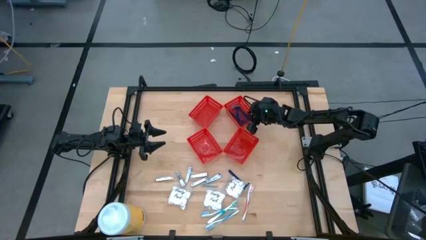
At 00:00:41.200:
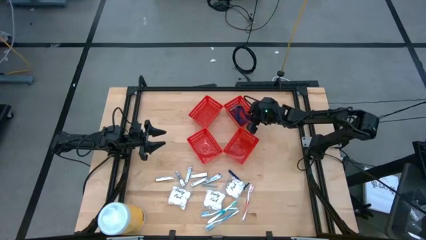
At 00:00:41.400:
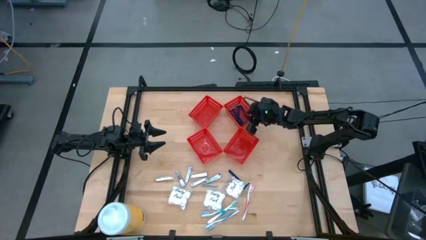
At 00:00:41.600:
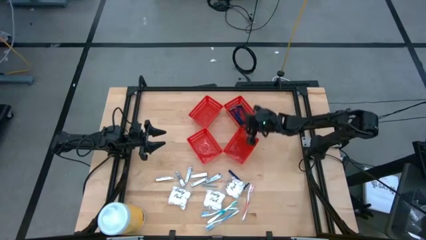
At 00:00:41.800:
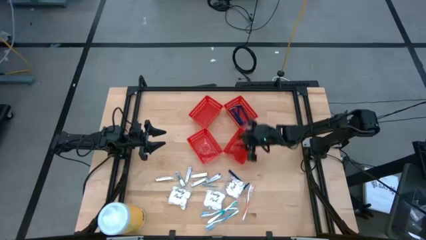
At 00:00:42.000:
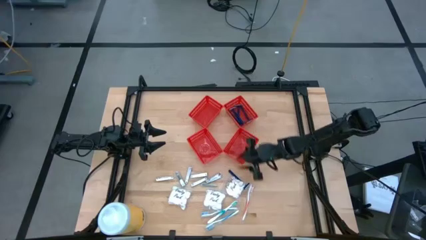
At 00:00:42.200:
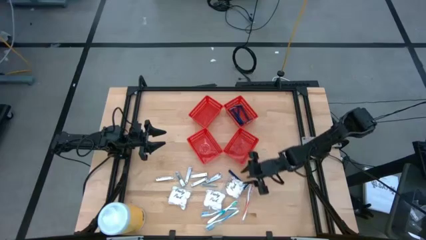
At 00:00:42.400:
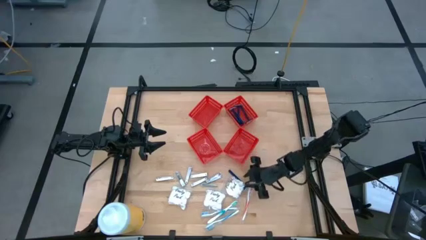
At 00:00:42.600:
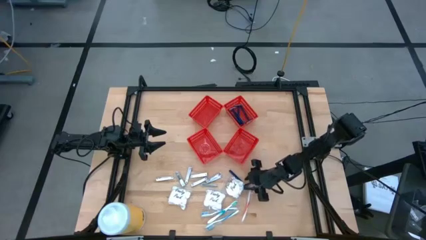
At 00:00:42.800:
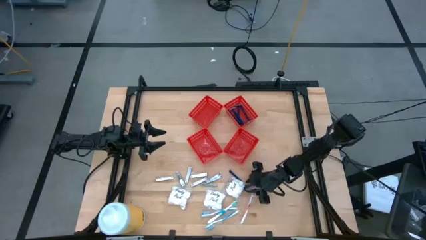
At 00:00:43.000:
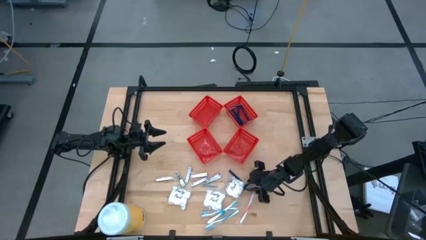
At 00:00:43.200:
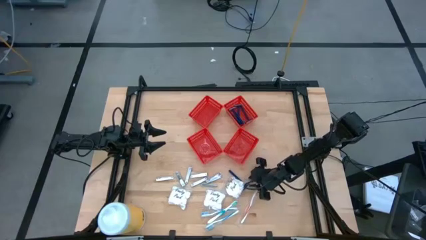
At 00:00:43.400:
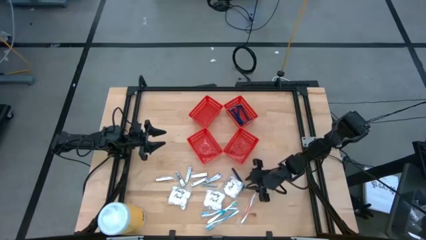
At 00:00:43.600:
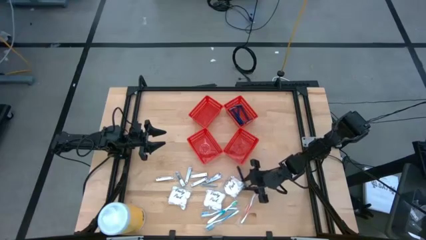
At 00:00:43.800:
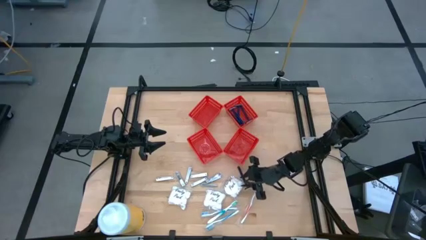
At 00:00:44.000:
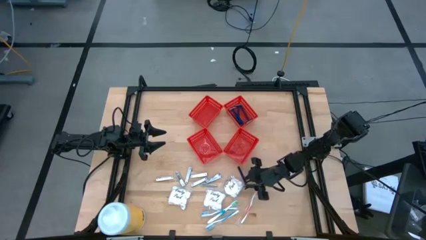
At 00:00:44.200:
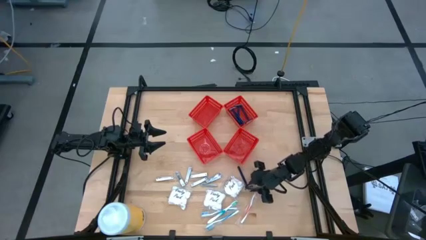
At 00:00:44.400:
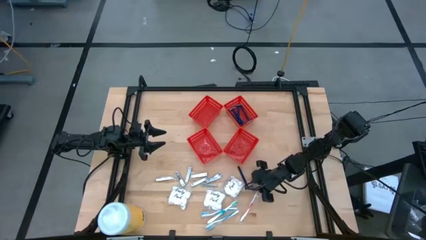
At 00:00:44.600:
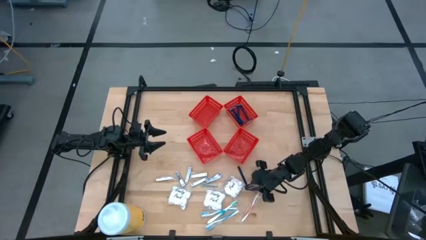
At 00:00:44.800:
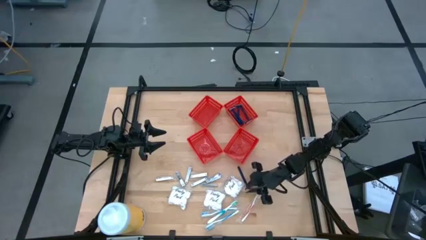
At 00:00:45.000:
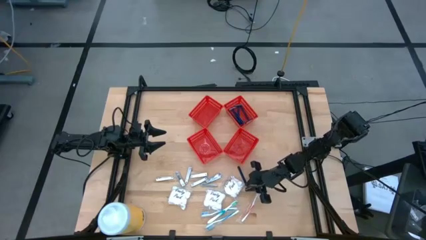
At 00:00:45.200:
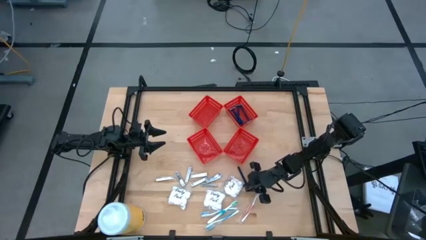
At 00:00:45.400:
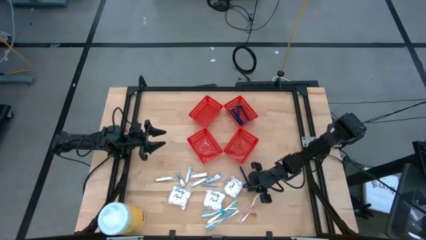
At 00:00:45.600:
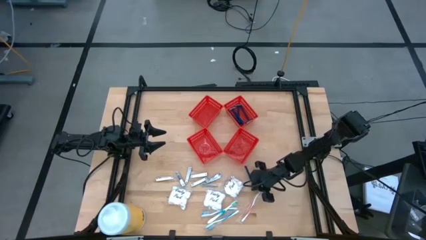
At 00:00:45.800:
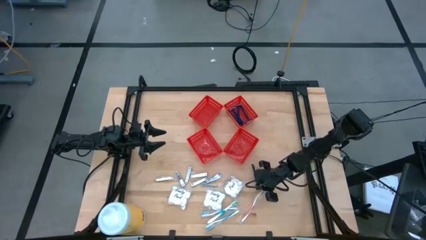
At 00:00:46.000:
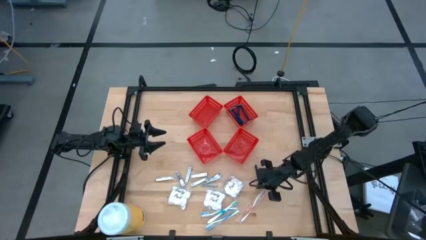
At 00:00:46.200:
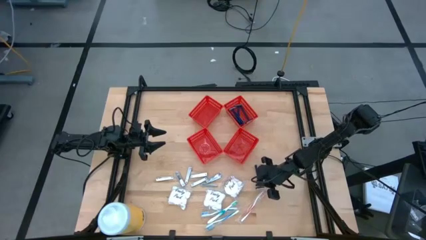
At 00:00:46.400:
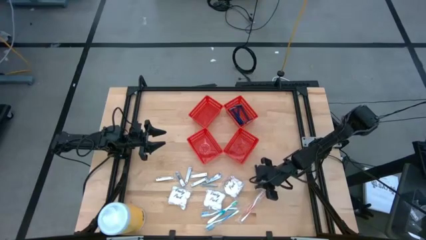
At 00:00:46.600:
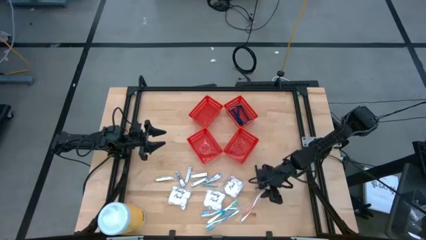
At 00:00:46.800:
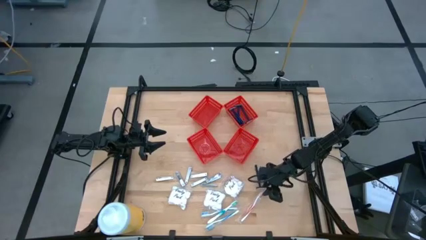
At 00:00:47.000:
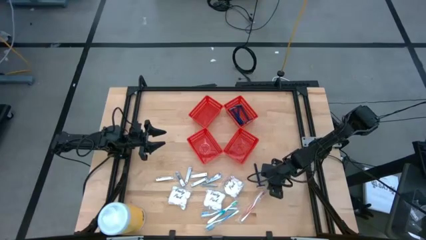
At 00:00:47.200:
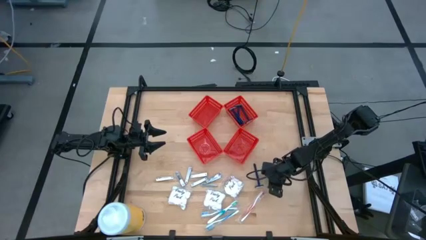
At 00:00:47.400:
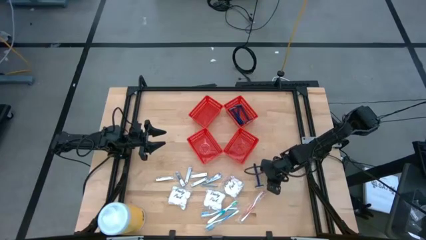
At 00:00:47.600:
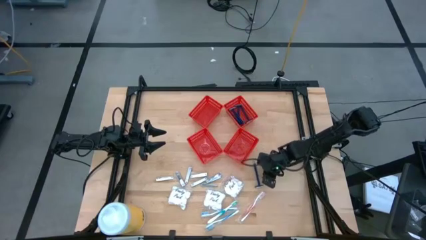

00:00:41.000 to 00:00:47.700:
Task: Pick & Place Travel size toiletries
Put the blue razor into the top right red bin

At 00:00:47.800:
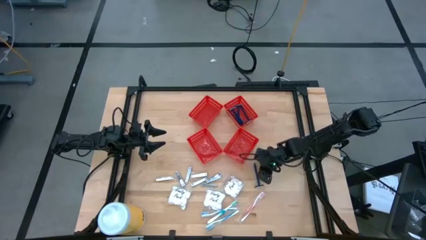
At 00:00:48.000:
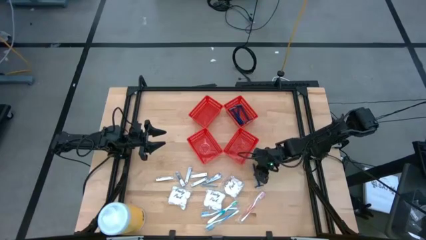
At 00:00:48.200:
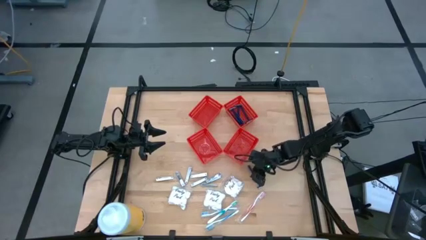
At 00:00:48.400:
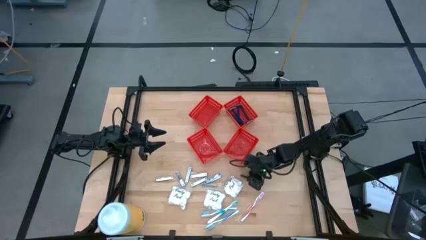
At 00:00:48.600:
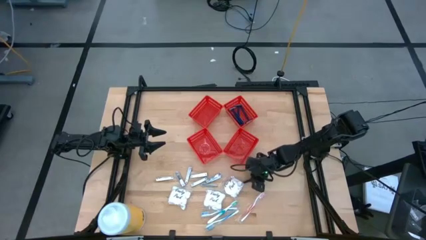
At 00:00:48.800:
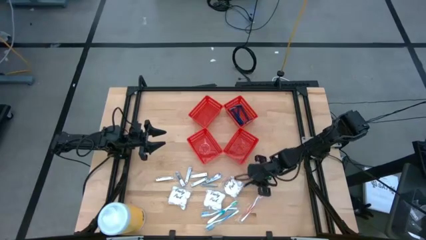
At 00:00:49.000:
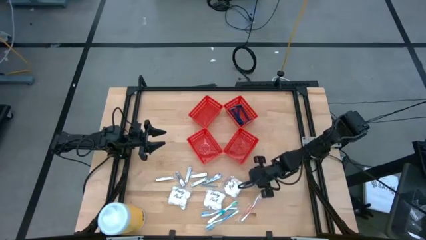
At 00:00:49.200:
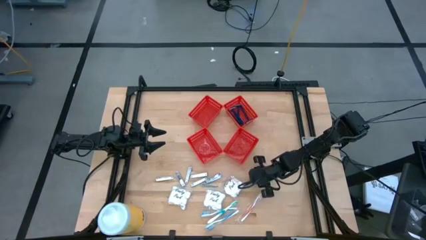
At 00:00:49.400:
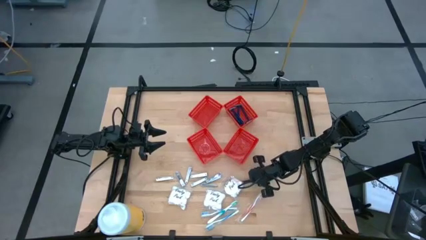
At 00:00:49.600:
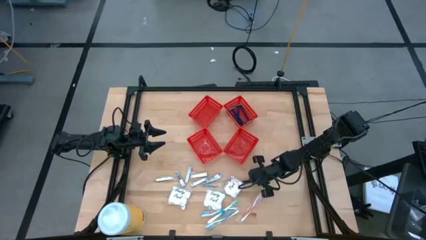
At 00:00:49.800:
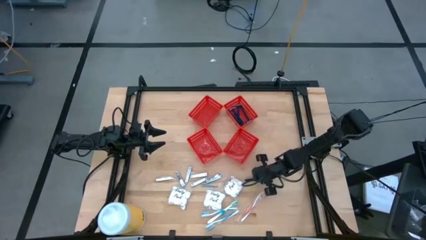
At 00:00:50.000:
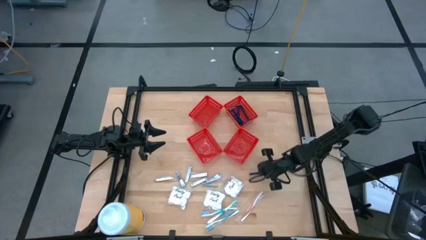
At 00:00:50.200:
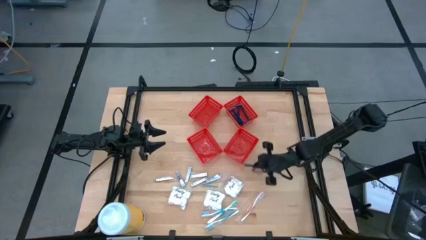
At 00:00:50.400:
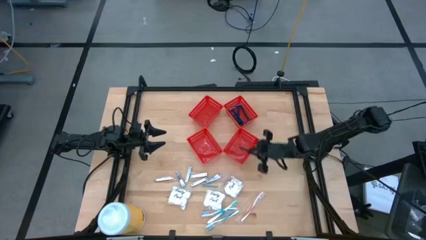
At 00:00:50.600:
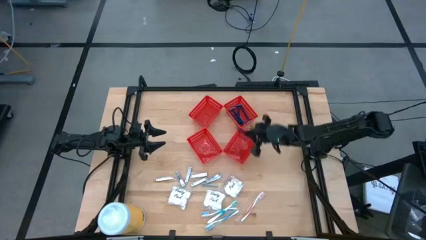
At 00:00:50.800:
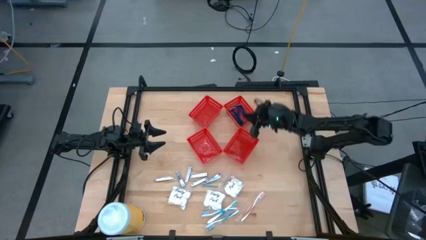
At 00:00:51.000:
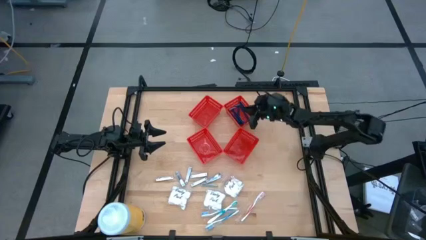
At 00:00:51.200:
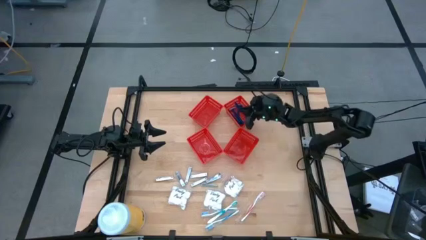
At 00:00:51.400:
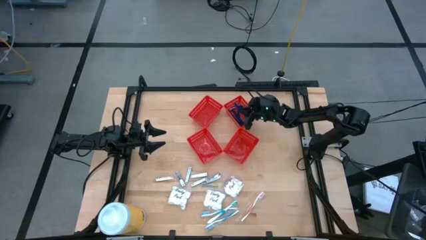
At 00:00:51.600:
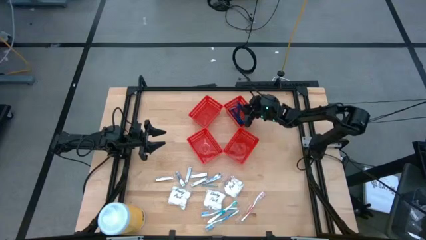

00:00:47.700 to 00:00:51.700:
Put the blue razor into the top right red bin

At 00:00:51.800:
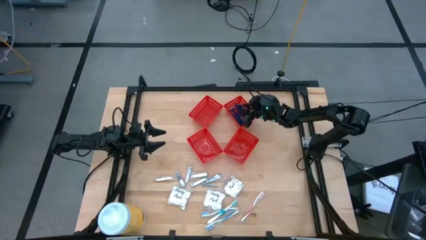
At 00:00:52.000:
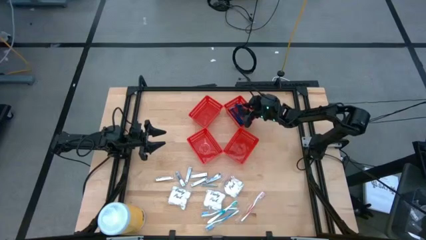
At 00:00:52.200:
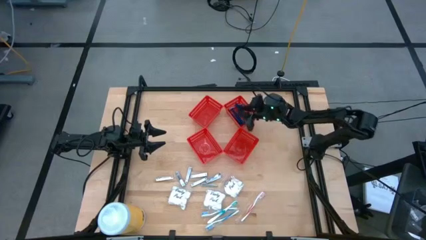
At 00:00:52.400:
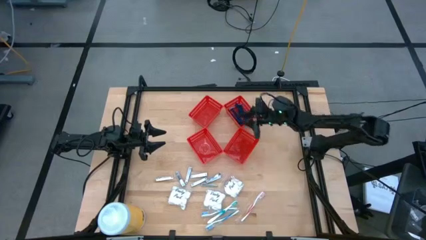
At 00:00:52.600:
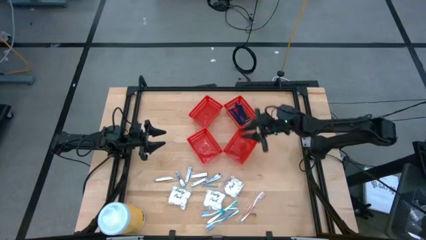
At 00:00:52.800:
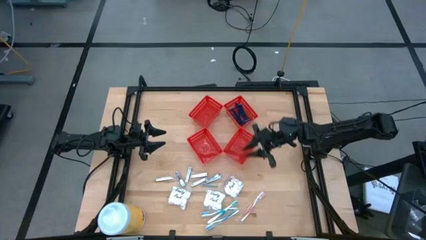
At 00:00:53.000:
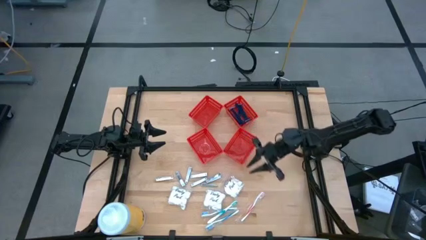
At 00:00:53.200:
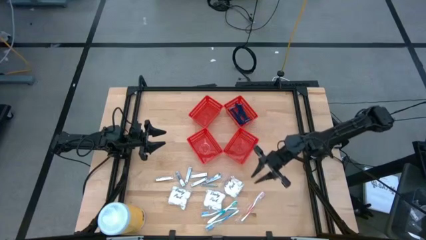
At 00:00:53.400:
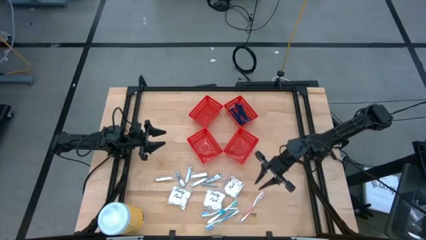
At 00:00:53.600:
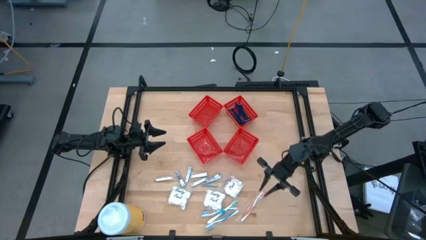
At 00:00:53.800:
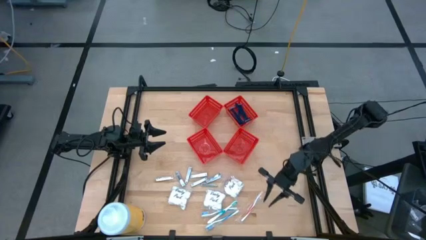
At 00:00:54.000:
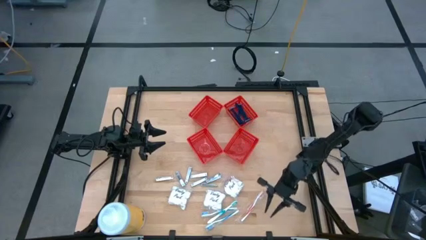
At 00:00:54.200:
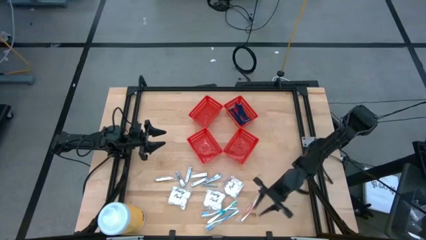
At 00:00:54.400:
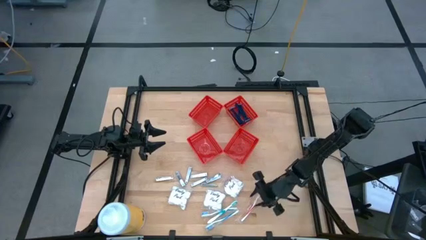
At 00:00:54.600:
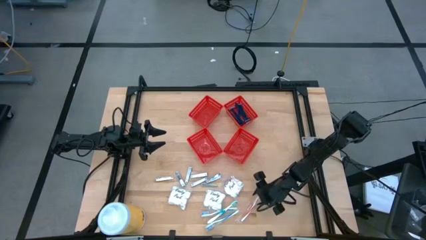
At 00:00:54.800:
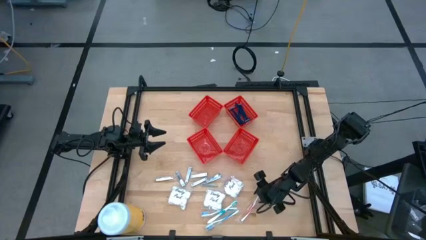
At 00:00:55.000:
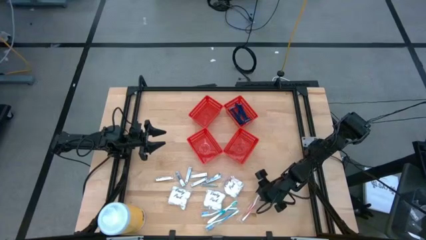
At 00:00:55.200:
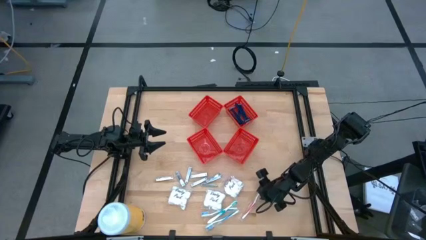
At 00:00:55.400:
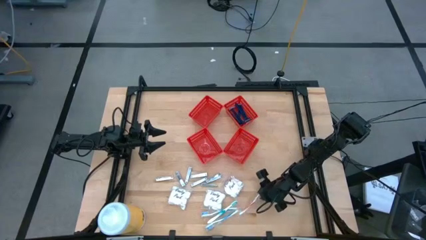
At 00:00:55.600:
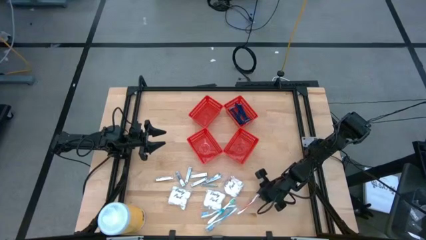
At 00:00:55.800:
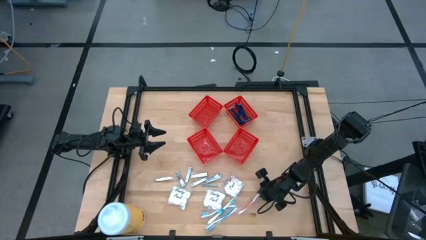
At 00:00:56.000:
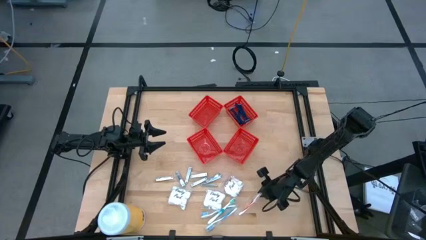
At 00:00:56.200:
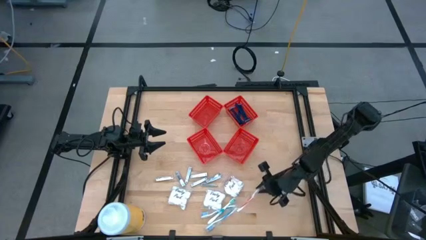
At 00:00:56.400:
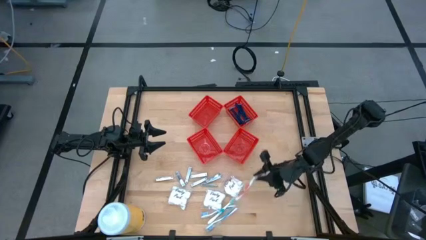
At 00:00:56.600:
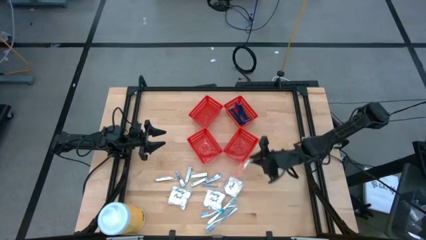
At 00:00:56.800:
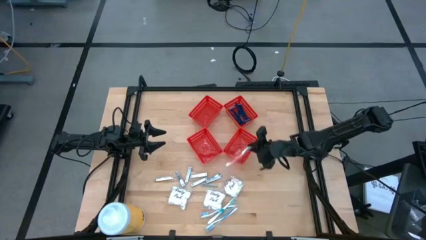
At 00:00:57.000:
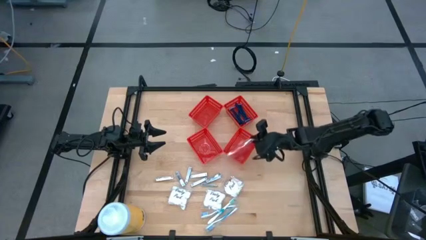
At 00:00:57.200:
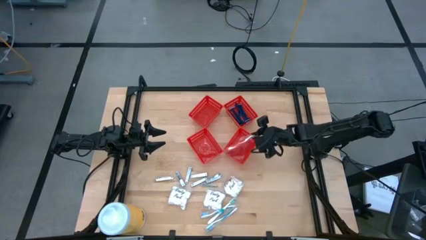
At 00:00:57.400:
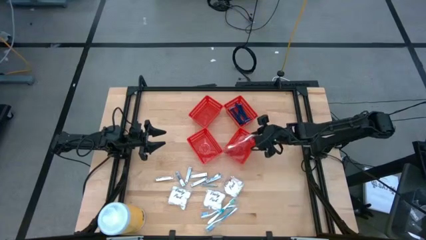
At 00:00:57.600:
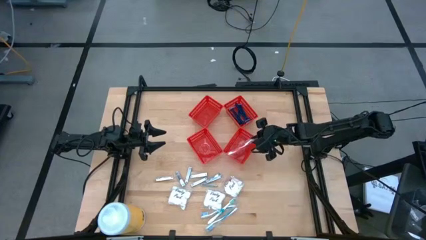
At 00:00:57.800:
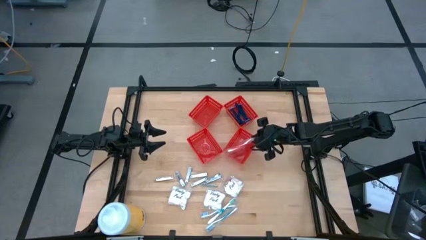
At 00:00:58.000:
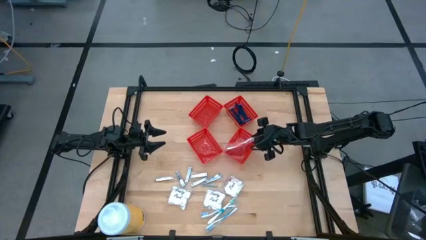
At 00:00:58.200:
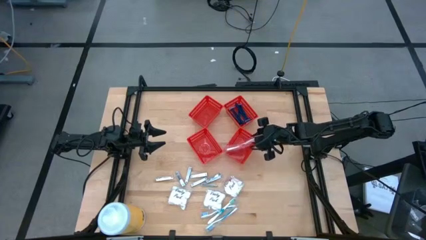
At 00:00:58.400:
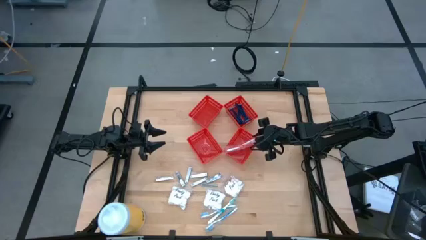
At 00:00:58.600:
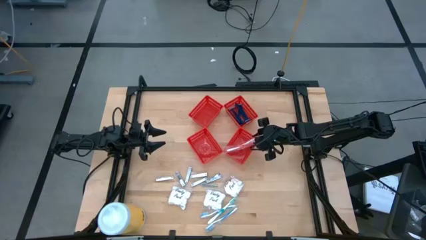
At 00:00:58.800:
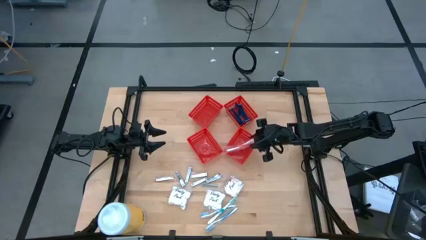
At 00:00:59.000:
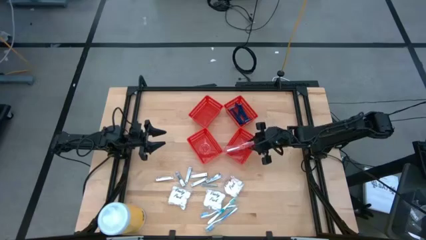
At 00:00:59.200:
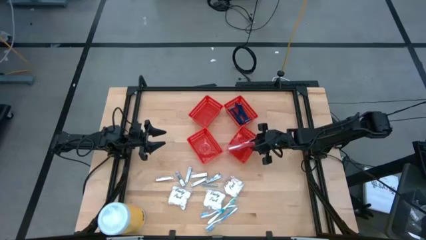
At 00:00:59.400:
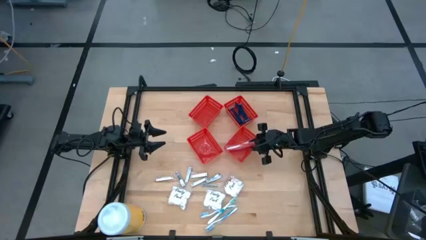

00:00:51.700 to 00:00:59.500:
Put the orange toothbrush into the bottom right red bin
